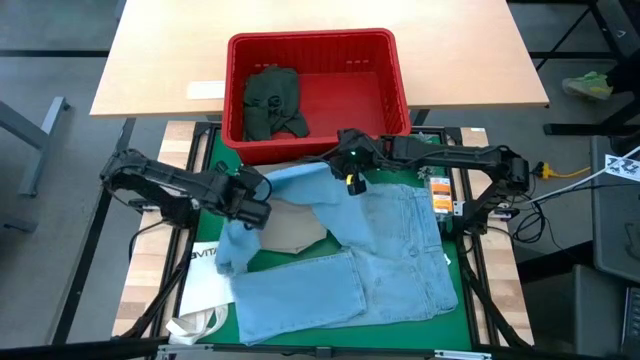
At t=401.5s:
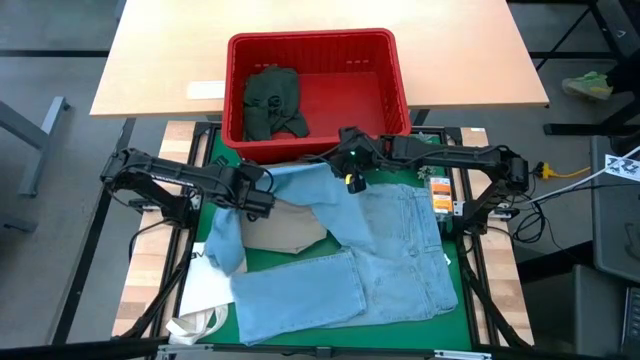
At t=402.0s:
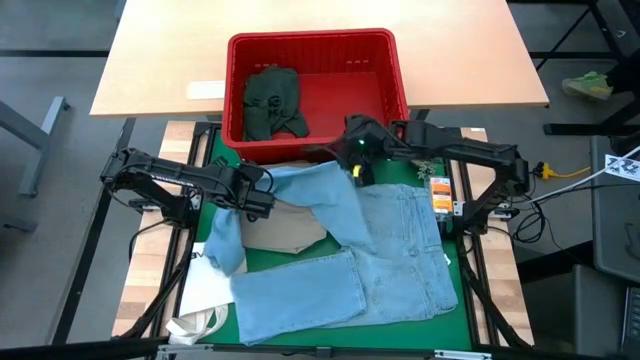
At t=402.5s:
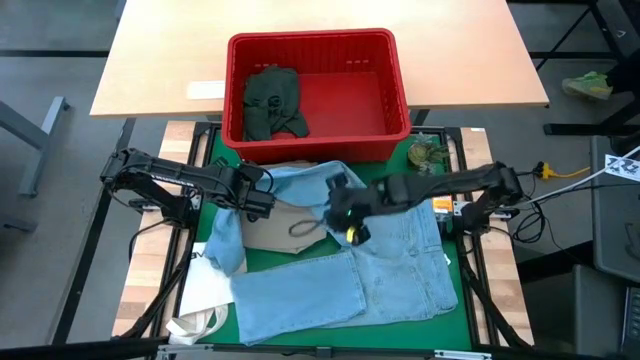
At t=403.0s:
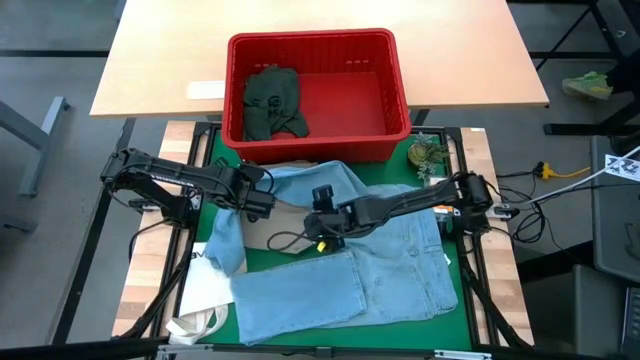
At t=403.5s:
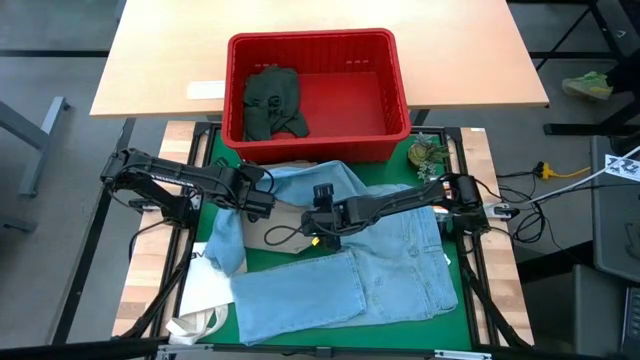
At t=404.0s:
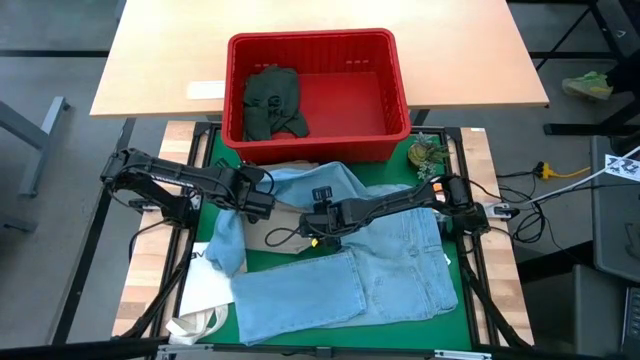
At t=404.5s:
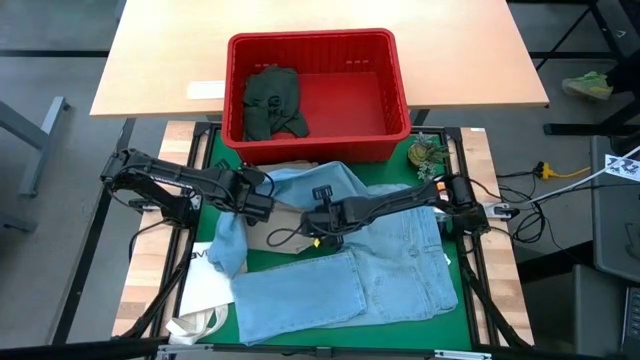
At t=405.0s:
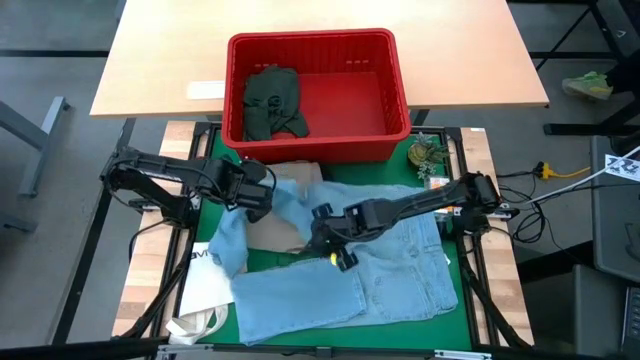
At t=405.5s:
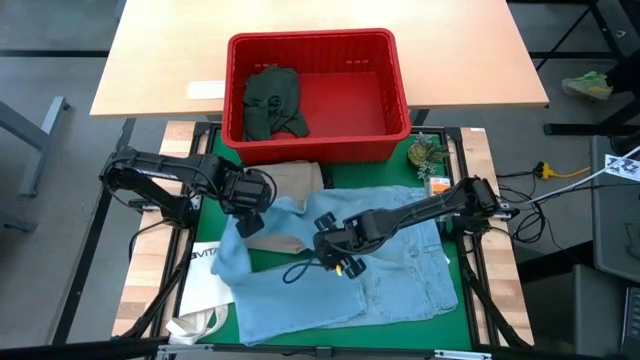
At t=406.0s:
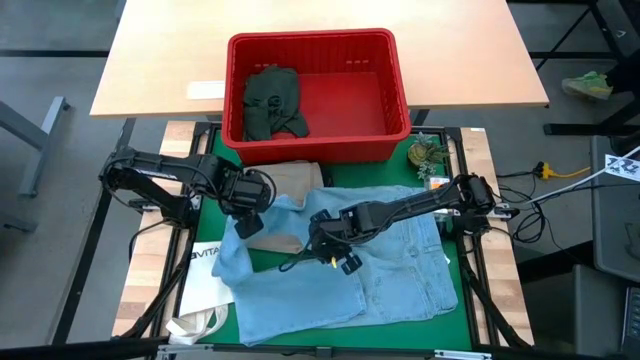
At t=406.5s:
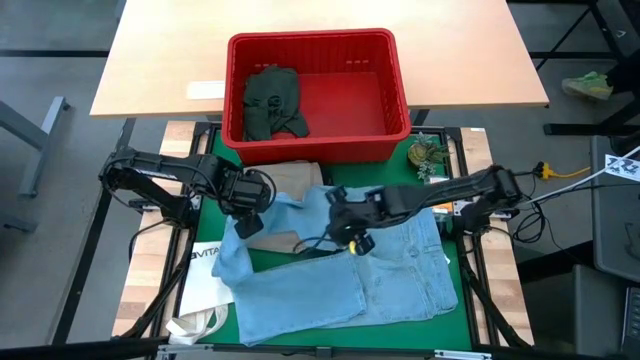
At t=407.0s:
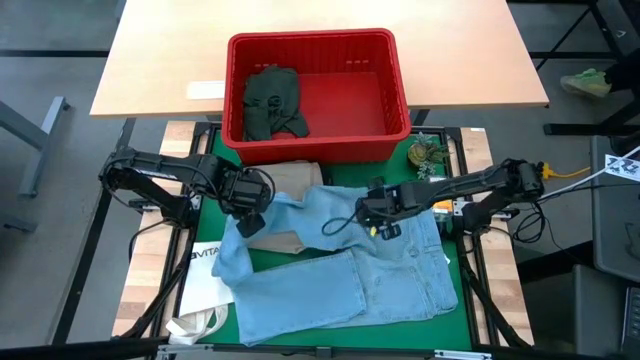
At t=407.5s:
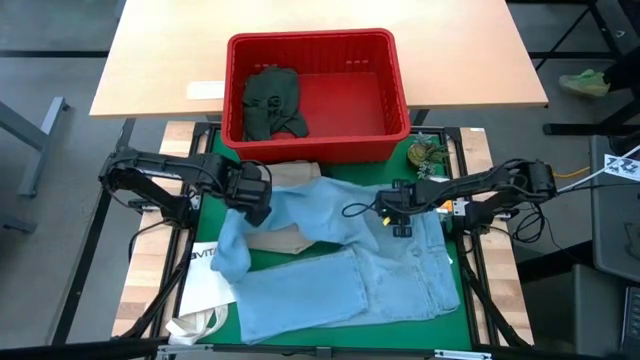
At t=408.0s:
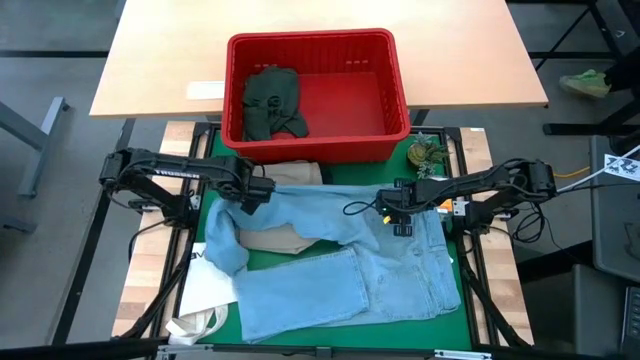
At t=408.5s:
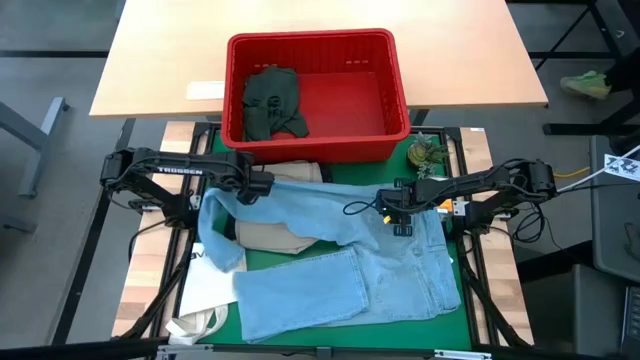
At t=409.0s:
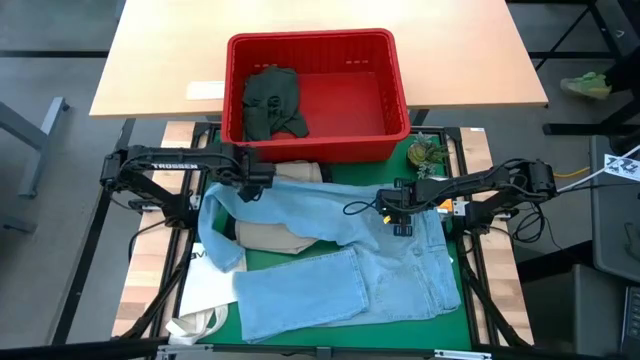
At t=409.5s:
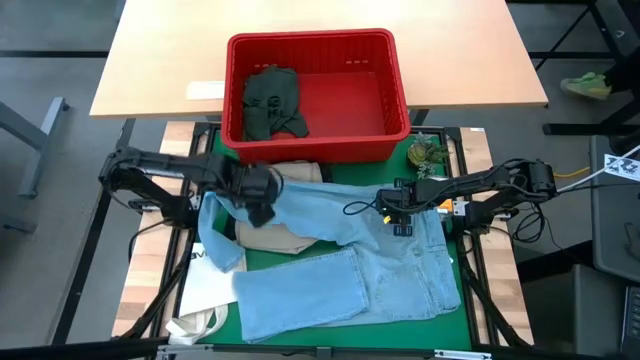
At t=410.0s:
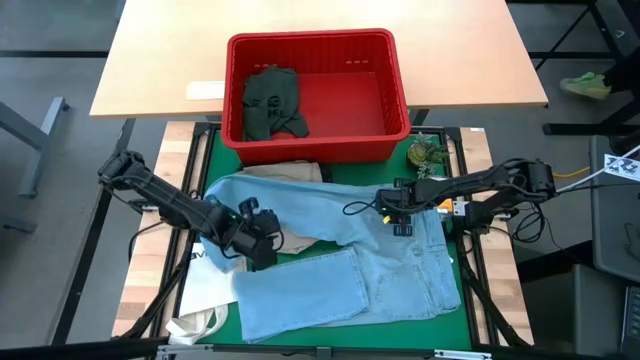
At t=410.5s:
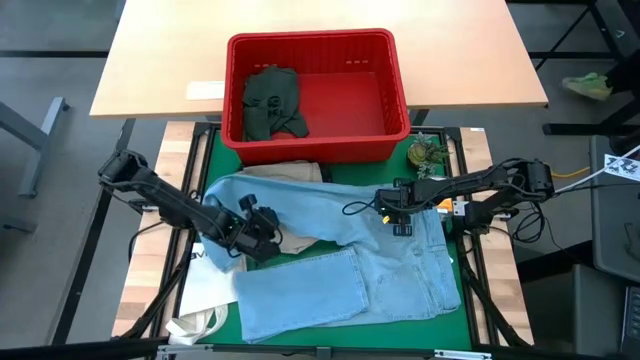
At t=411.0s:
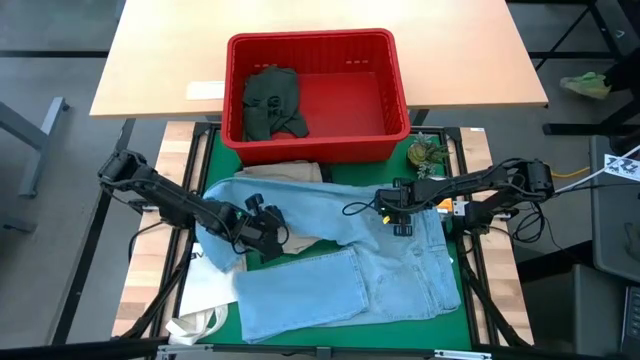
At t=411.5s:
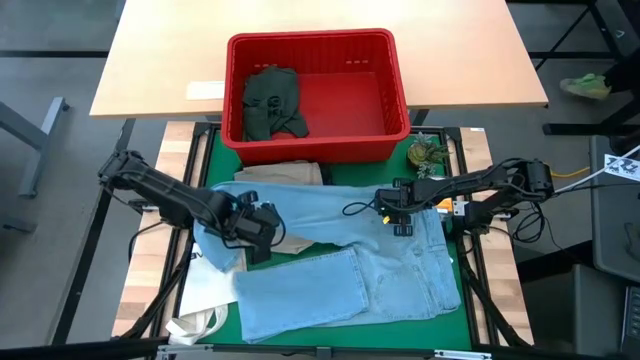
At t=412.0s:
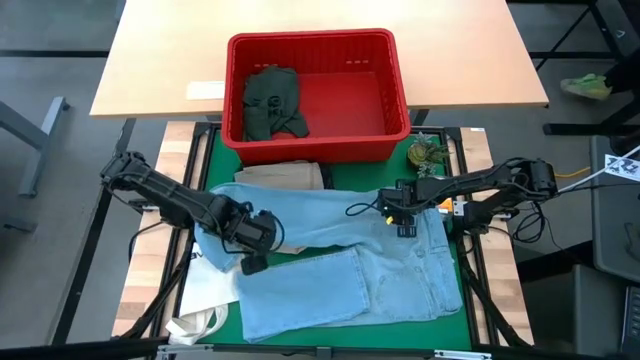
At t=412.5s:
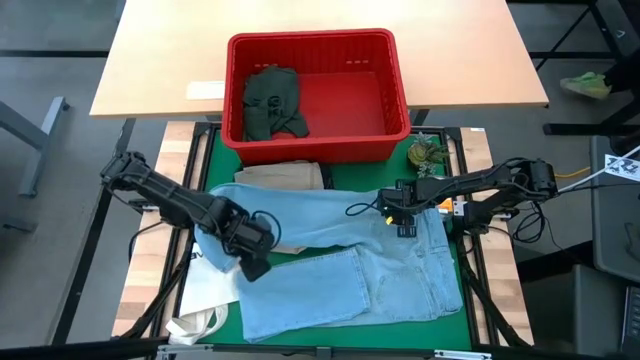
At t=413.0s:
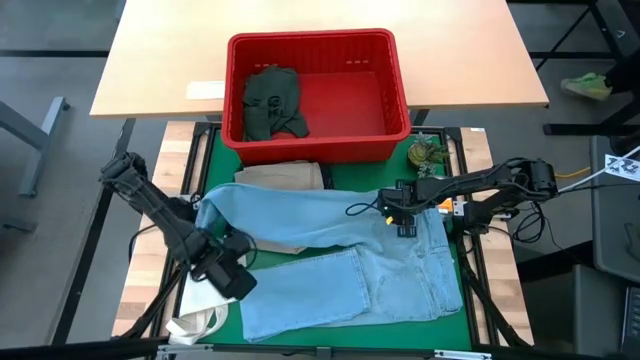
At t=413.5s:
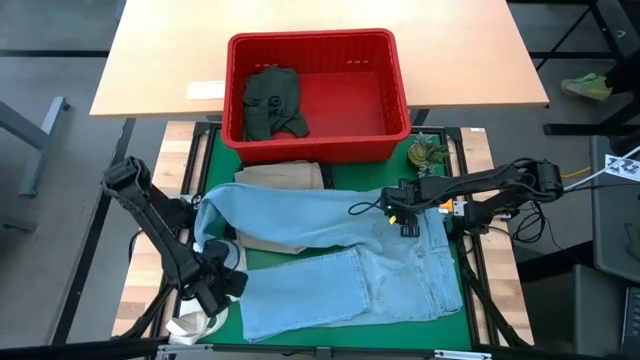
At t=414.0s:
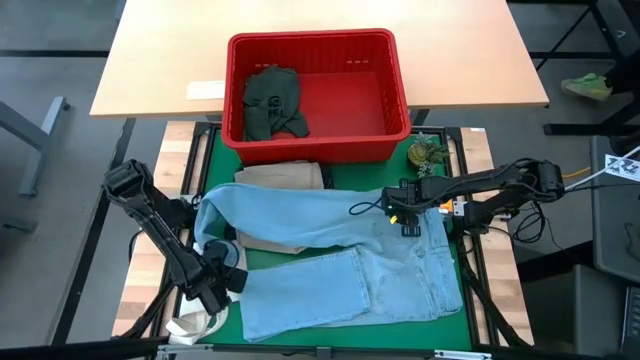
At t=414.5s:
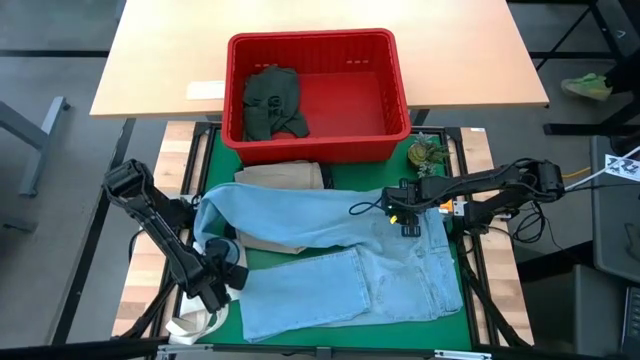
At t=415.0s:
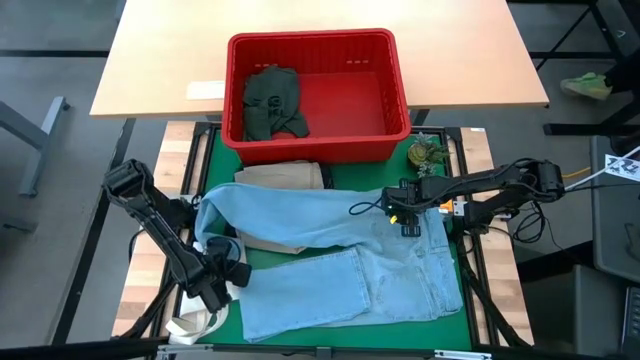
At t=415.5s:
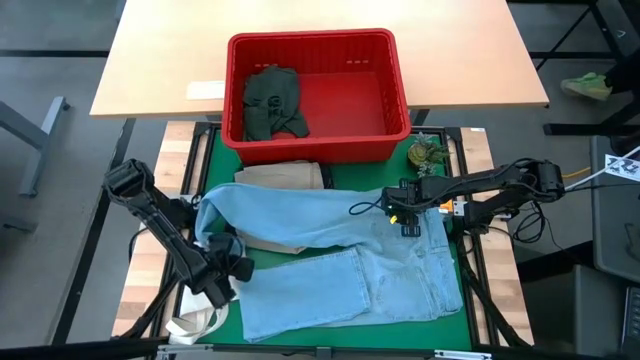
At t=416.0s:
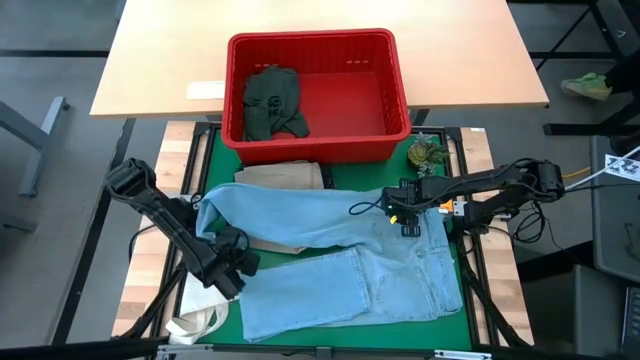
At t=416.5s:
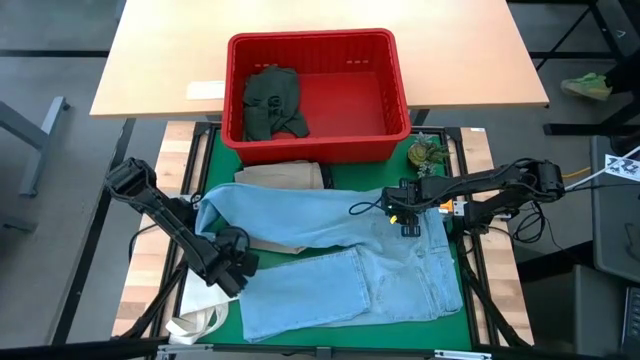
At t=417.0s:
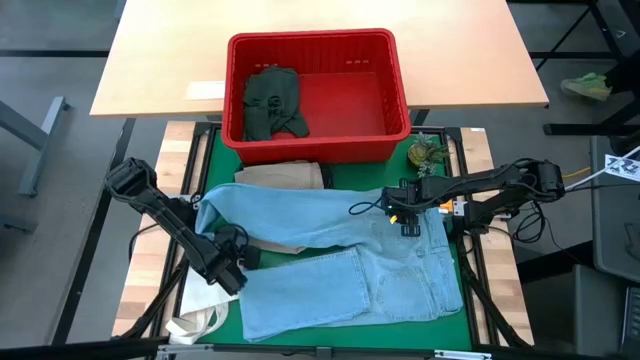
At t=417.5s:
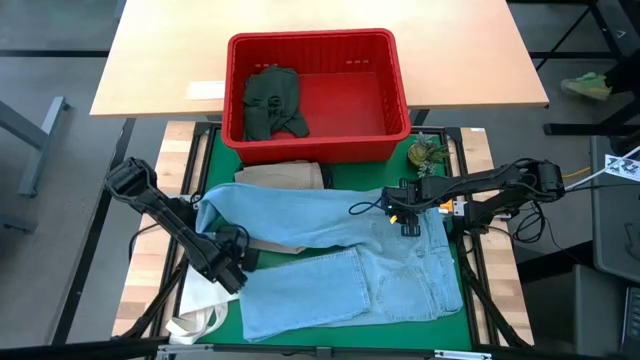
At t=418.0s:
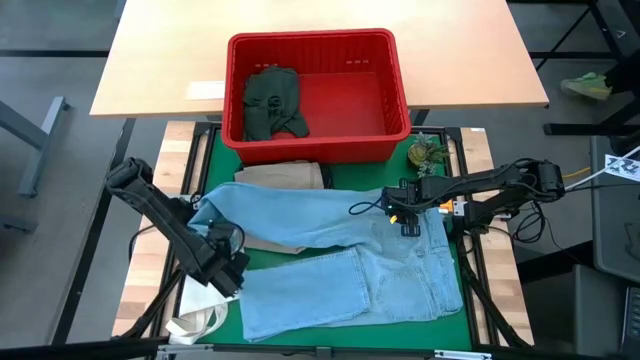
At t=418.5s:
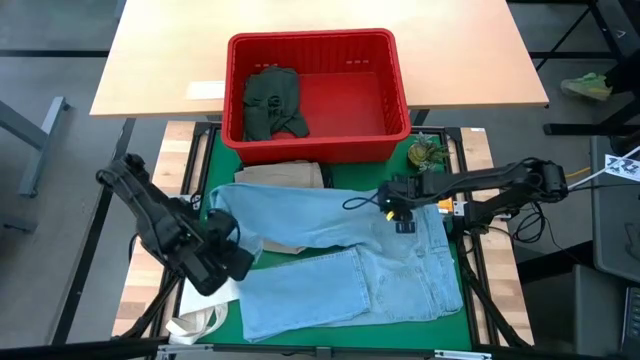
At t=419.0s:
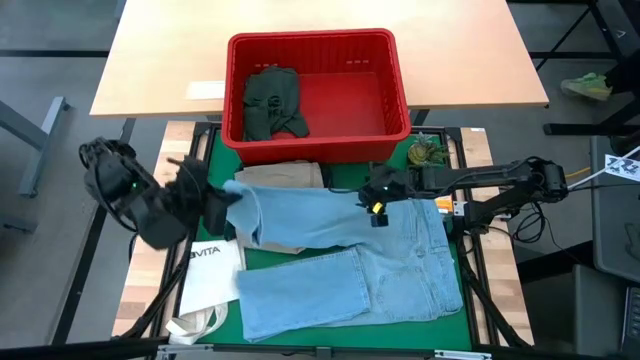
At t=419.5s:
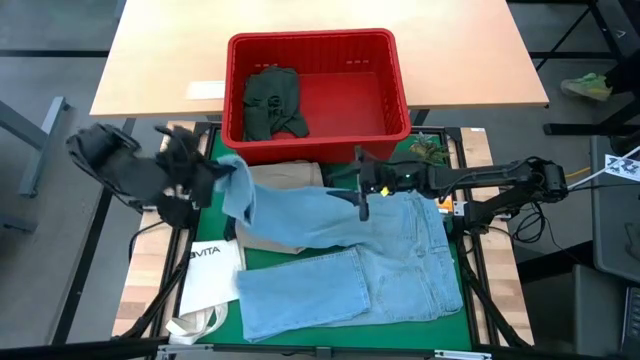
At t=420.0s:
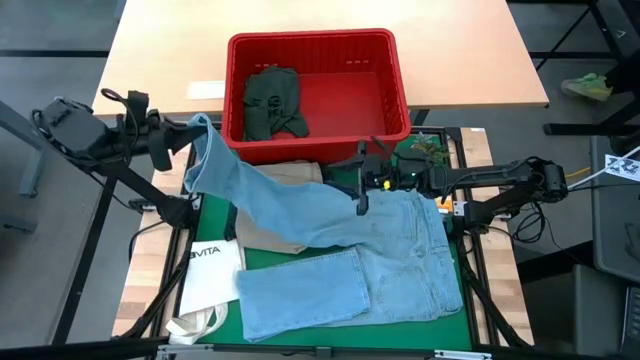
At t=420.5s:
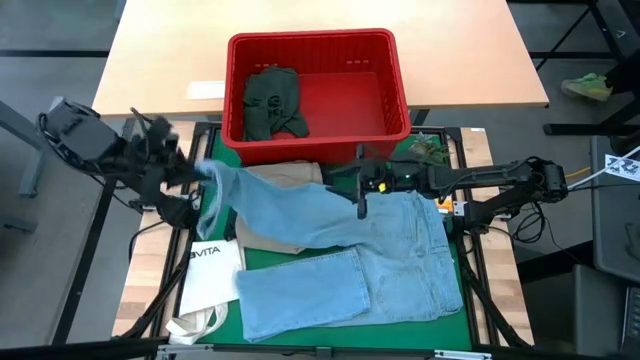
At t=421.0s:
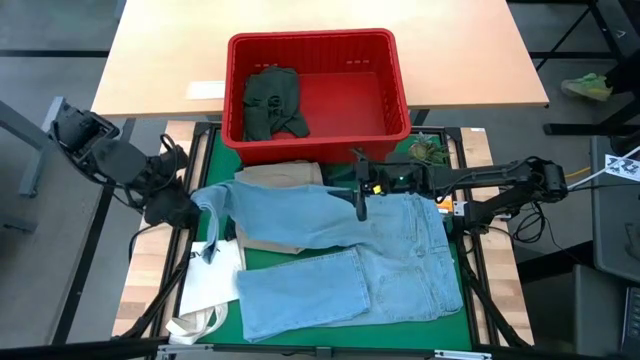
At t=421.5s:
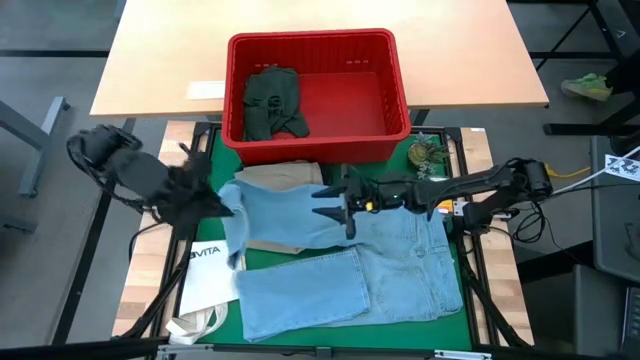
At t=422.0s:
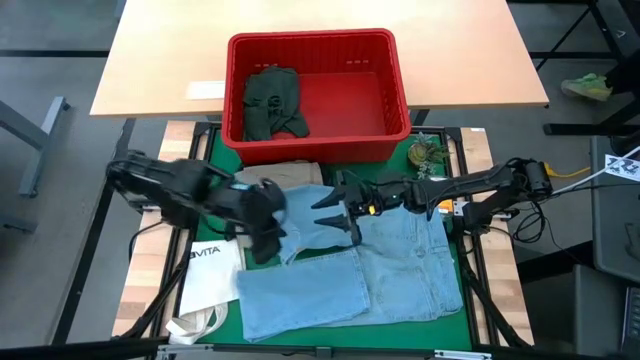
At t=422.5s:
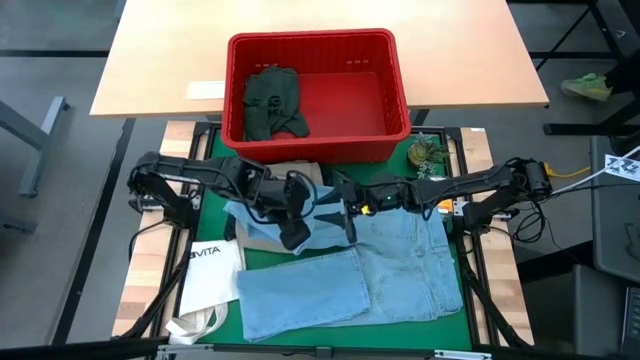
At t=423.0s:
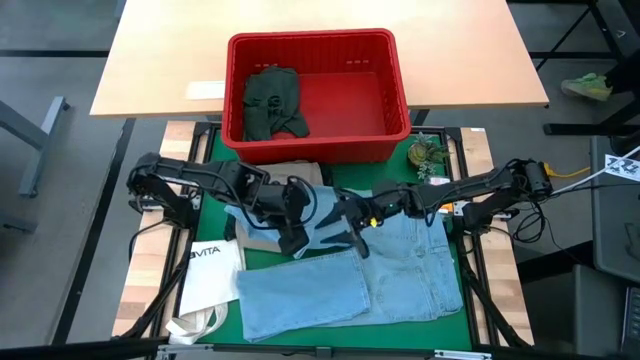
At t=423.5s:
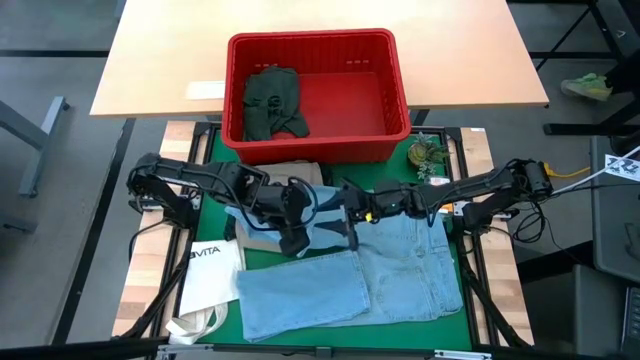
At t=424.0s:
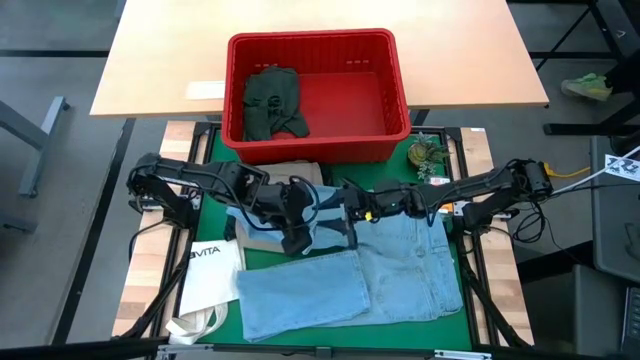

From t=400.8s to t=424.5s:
Task: Fold Laundry from Bin
Fold the light blue pants
